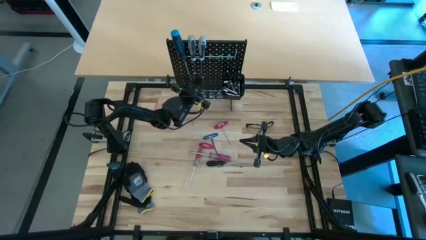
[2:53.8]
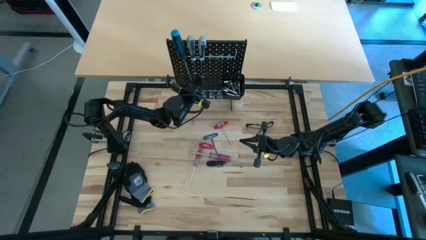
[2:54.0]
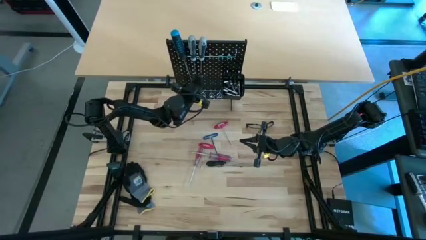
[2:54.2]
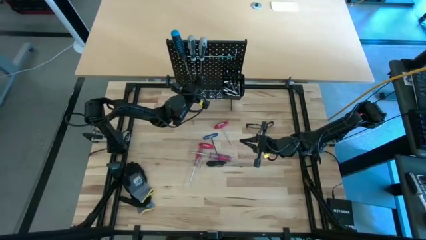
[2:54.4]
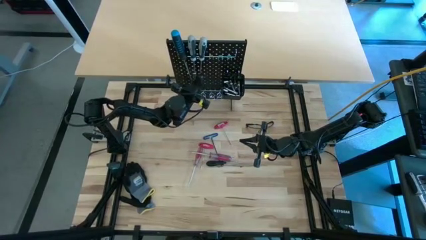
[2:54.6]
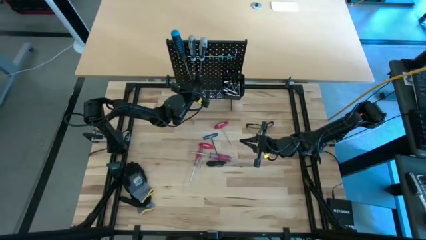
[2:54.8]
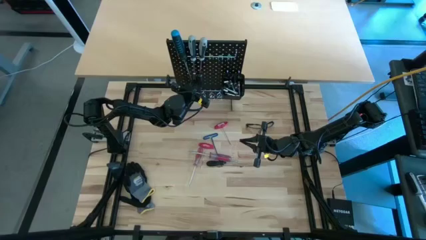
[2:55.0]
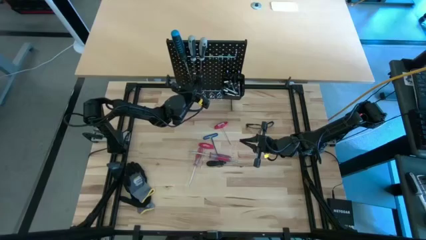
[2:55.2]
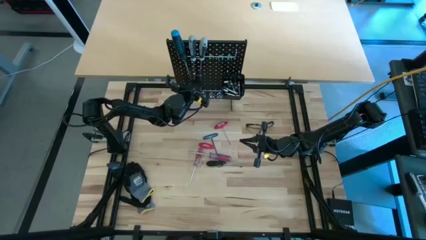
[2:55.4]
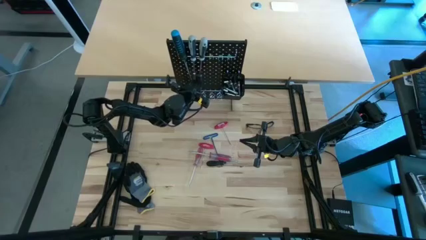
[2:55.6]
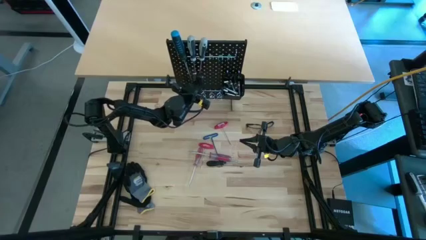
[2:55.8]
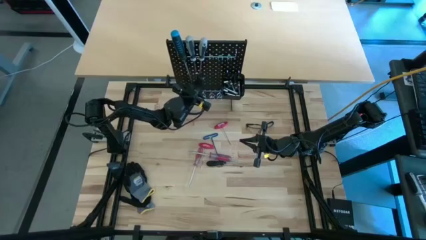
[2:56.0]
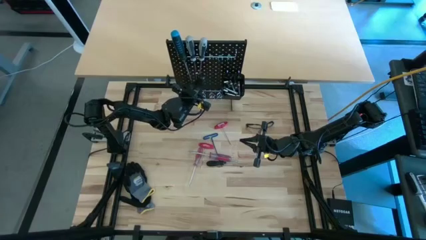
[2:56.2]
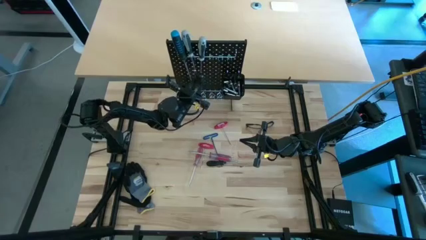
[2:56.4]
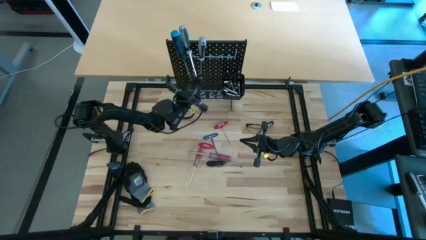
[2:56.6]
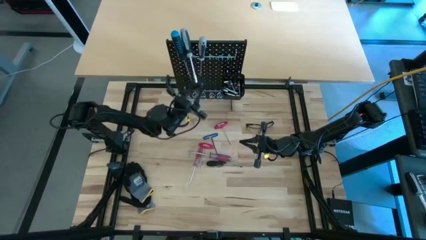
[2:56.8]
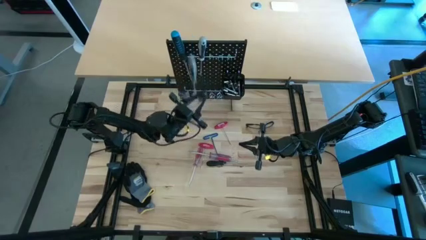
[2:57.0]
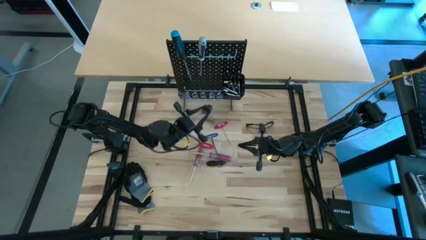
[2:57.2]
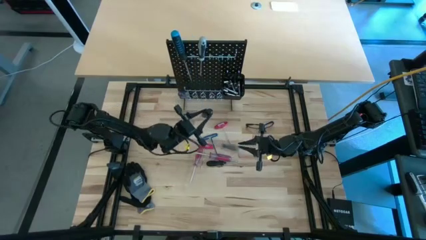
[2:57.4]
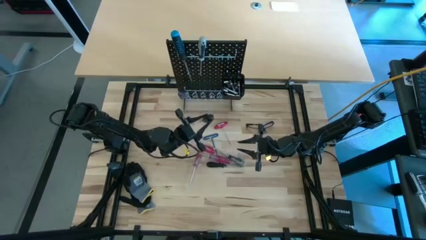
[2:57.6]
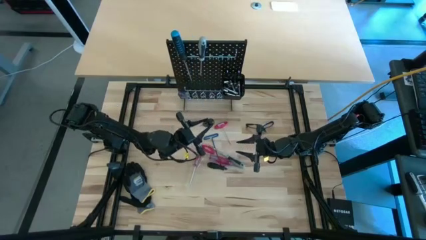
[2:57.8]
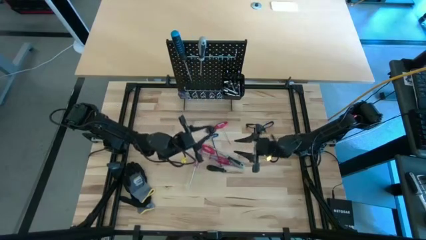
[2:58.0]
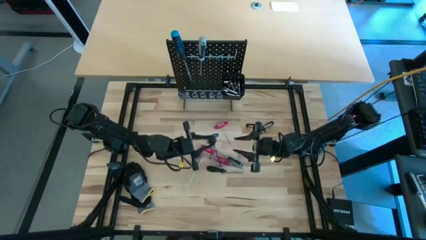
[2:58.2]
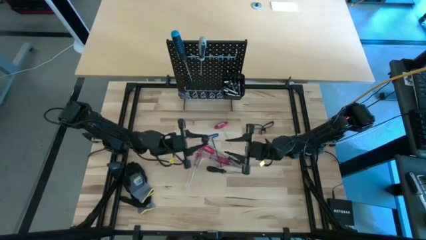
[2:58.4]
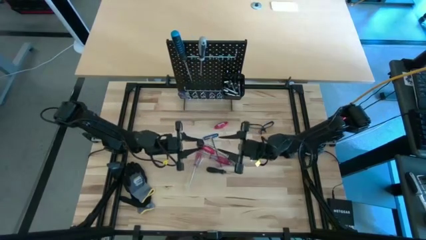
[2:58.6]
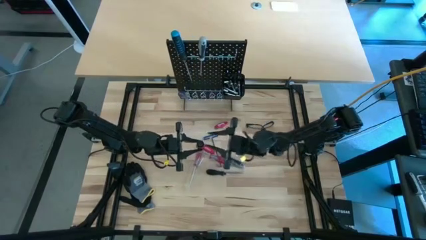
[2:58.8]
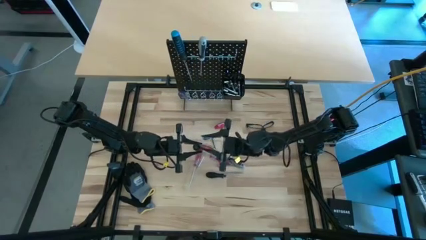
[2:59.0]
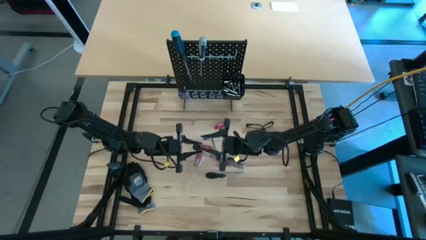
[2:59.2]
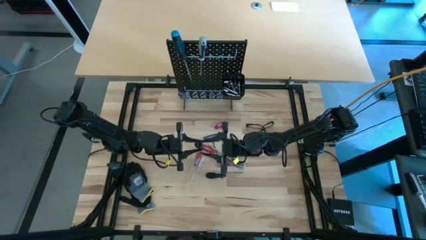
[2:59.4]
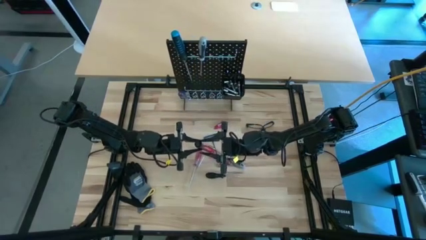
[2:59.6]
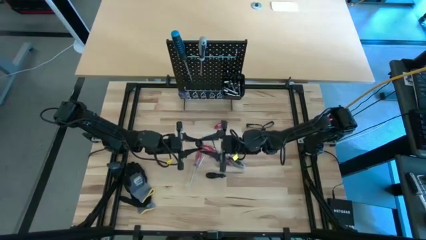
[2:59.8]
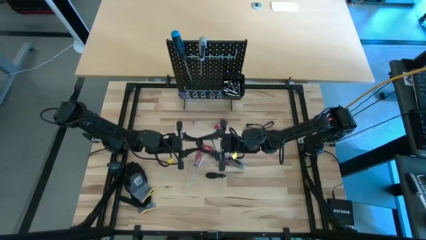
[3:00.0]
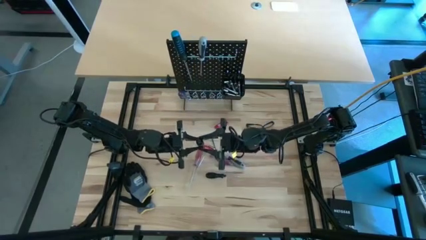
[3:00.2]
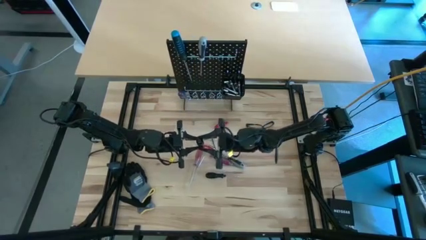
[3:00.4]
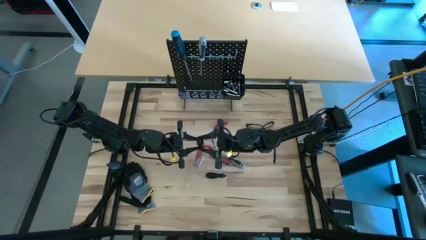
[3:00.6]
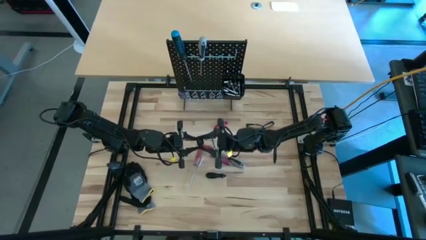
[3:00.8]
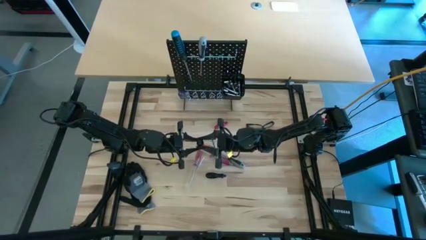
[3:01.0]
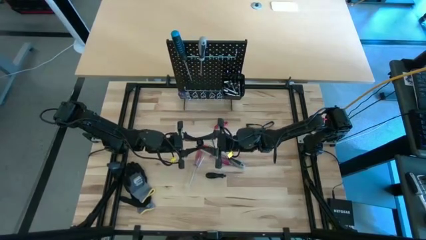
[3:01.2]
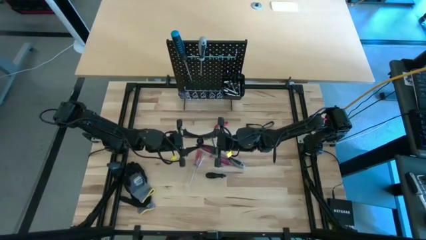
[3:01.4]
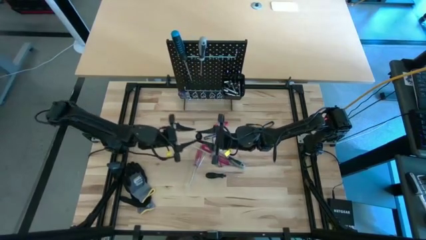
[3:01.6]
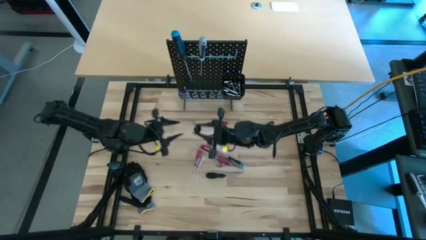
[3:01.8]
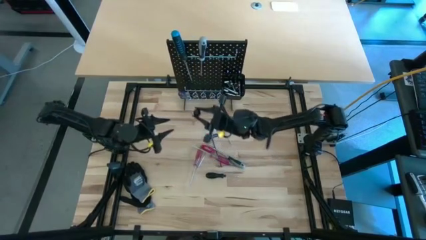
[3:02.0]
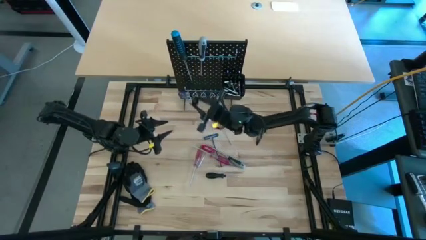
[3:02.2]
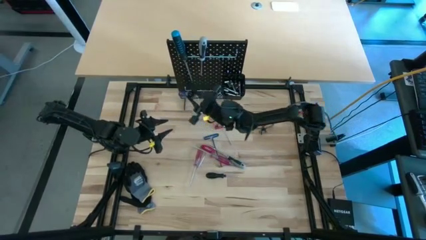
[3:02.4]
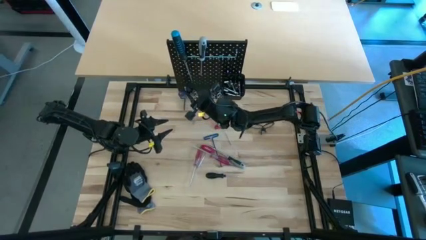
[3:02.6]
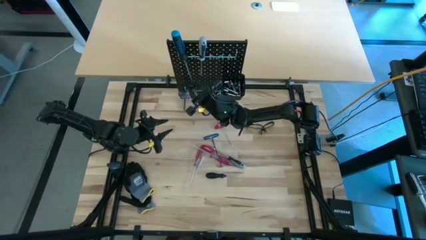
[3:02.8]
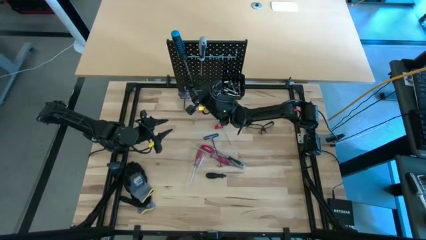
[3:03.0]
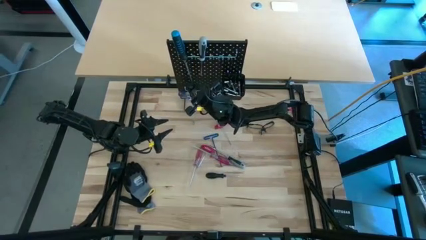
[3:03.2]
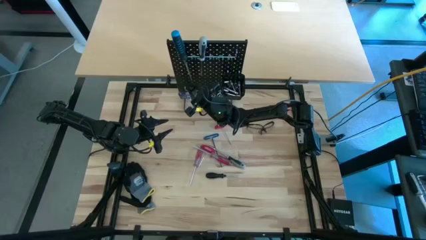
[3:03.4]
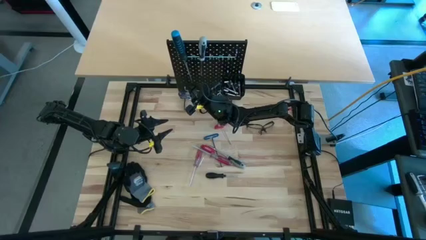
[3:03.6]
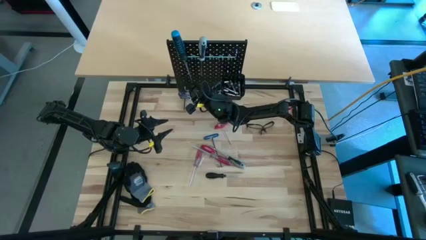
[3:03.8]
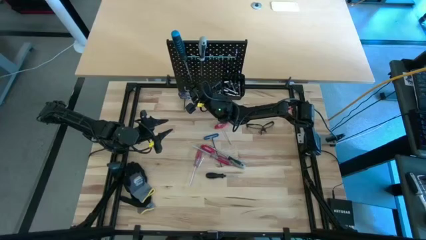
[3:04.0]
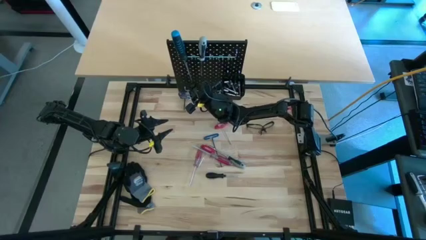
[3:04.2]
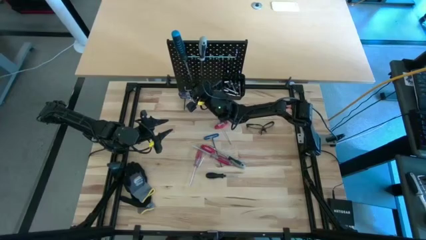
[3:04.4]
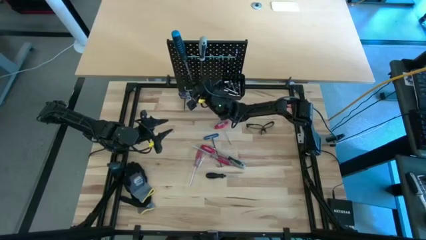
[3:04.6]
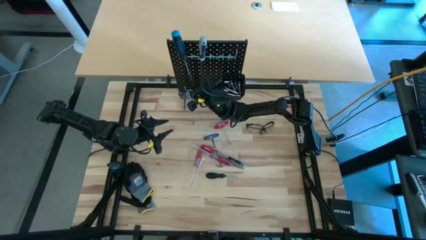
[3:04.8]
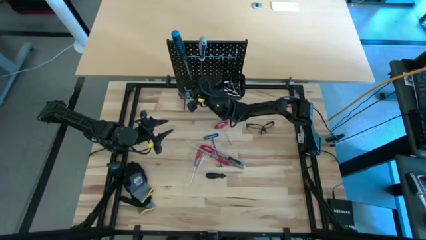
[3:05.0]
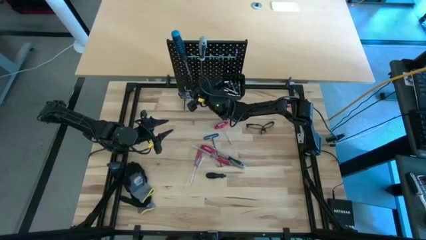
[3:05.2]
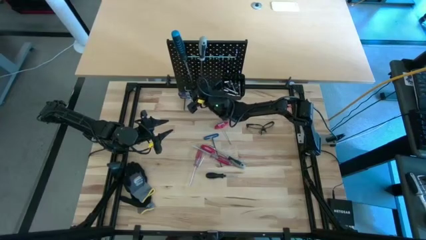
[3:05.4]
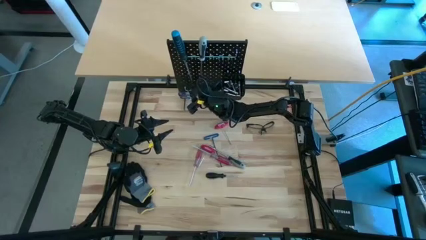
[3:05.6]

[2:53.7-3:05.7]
Task: Hang tools onto peg board
Hang the black screwdriver on the peg board
